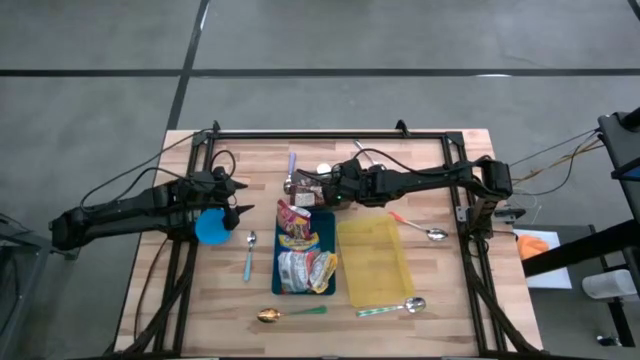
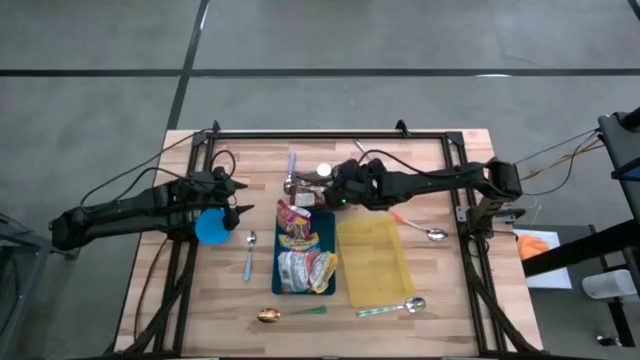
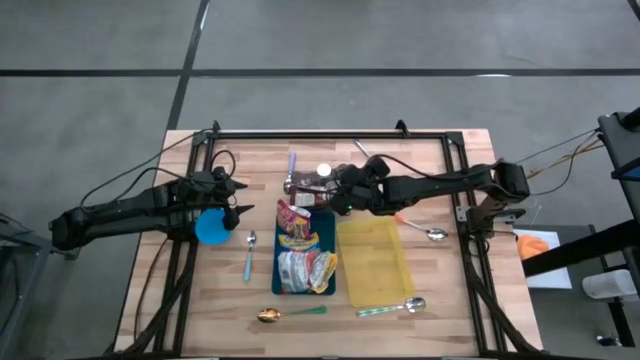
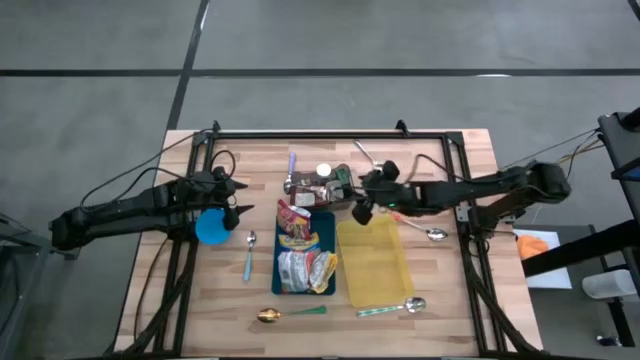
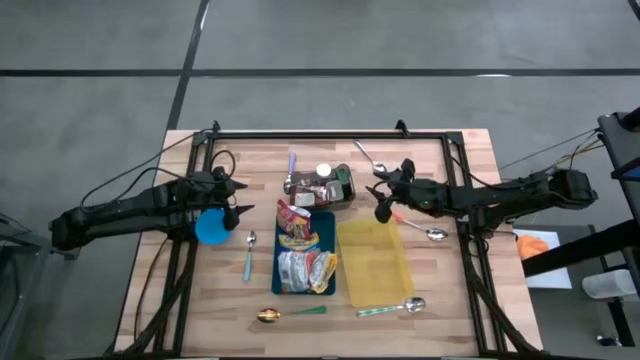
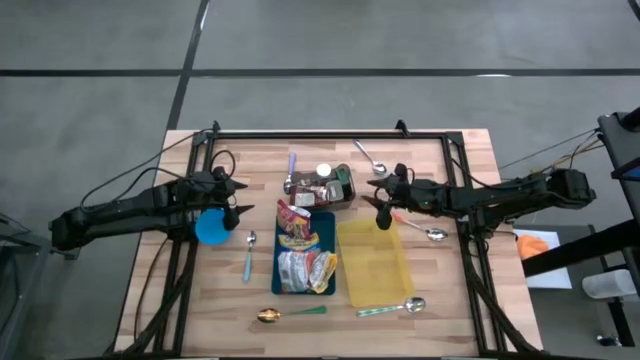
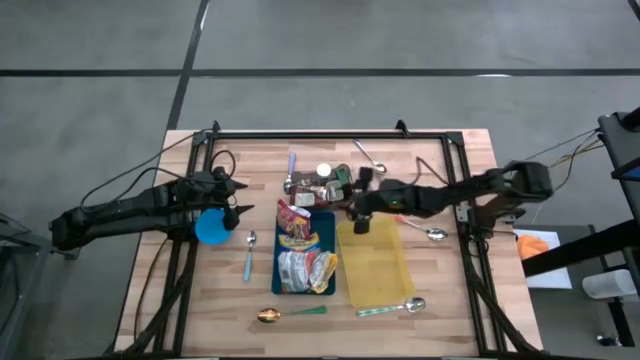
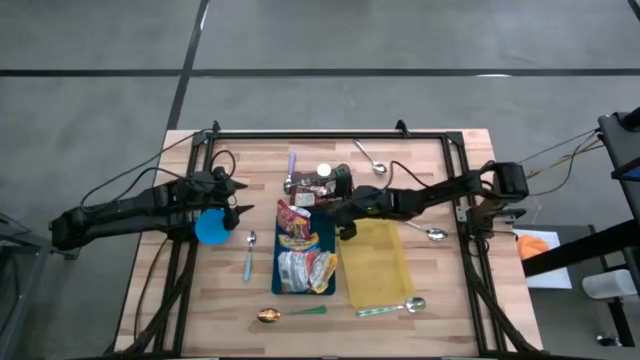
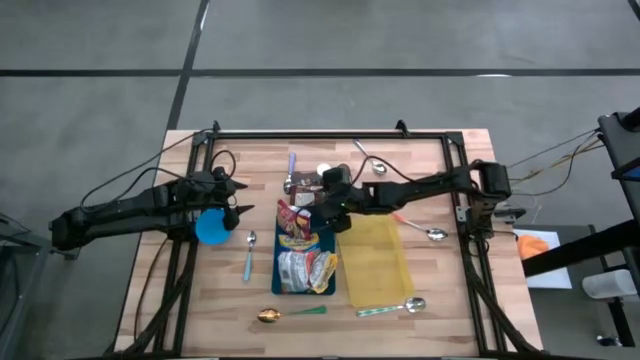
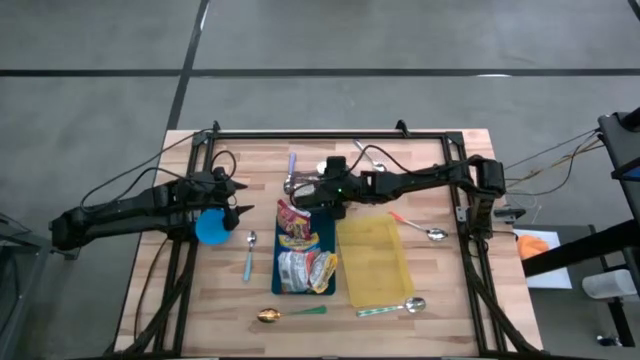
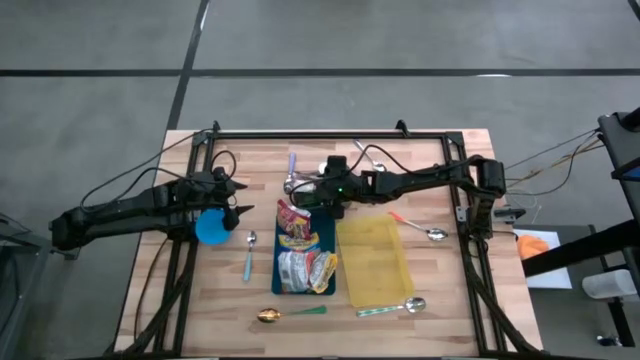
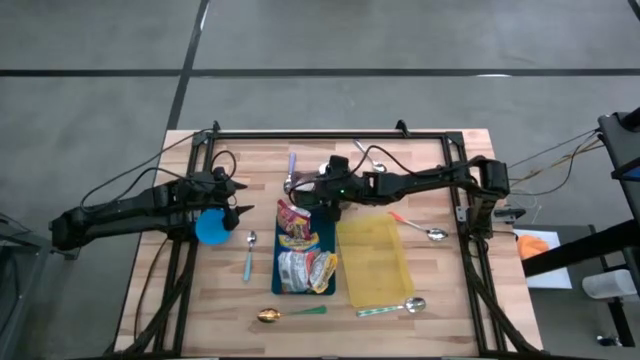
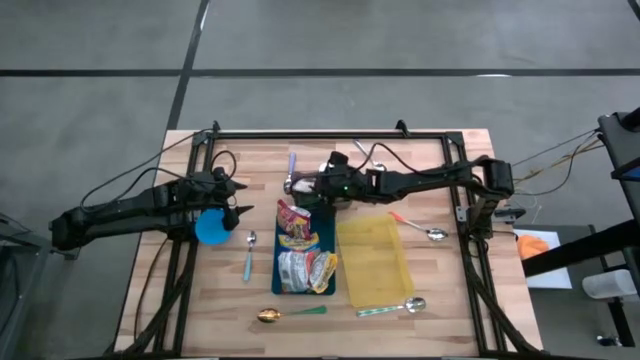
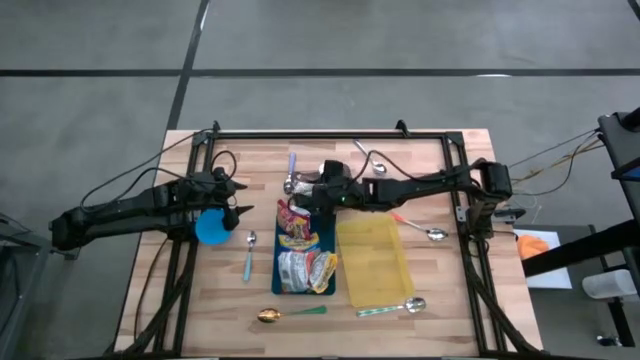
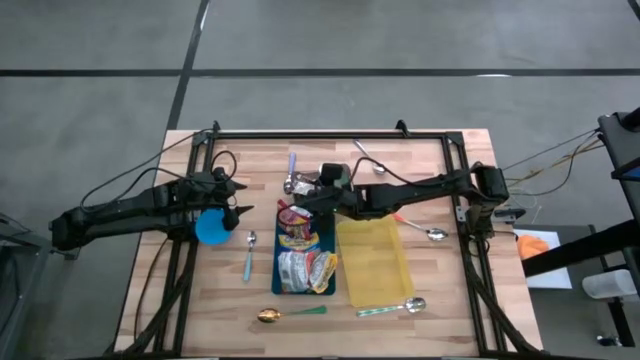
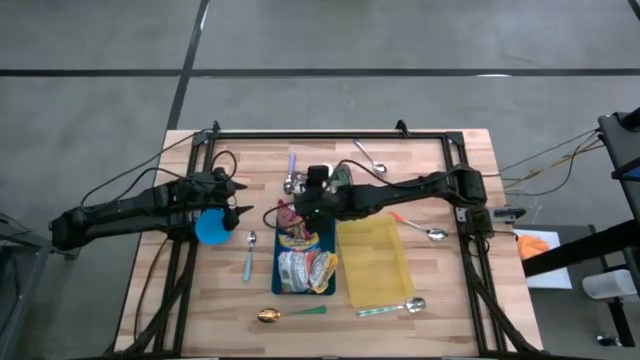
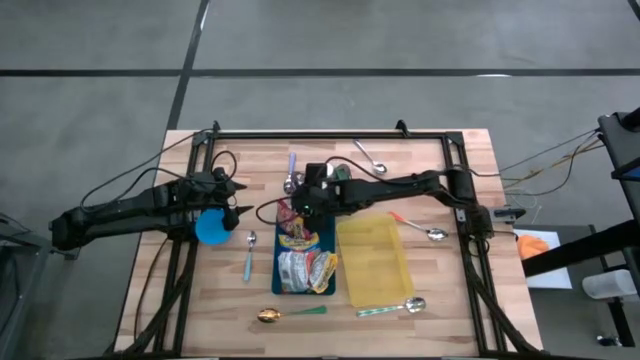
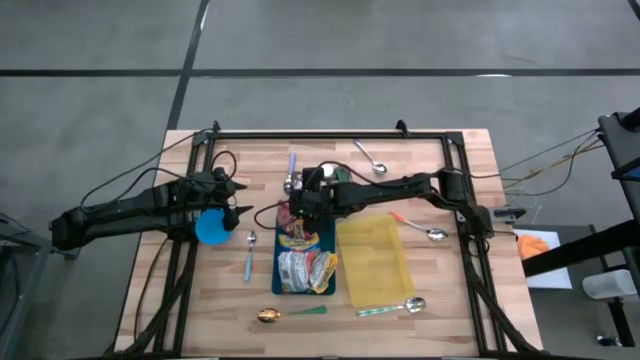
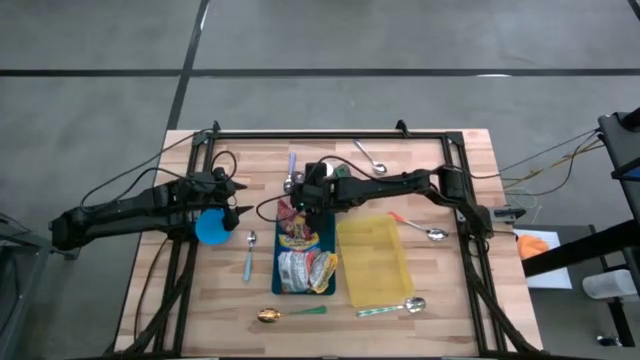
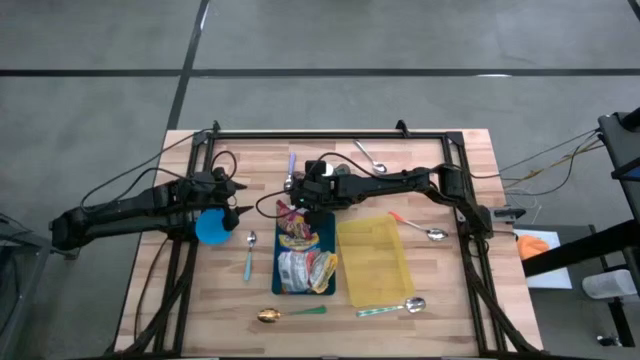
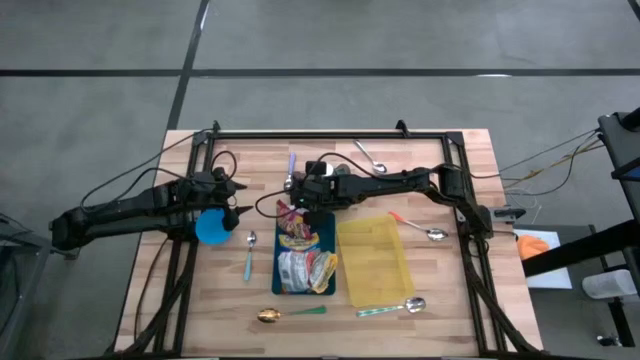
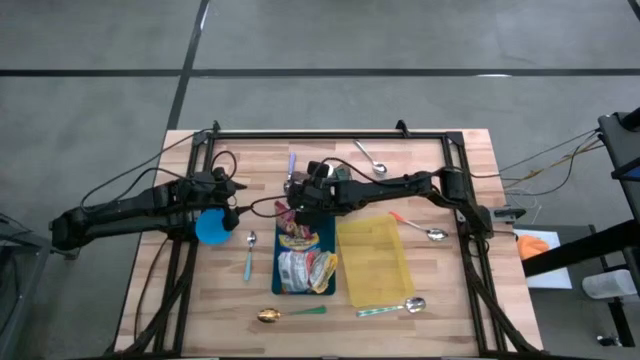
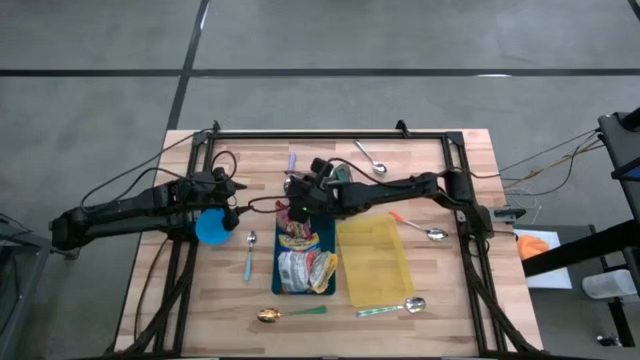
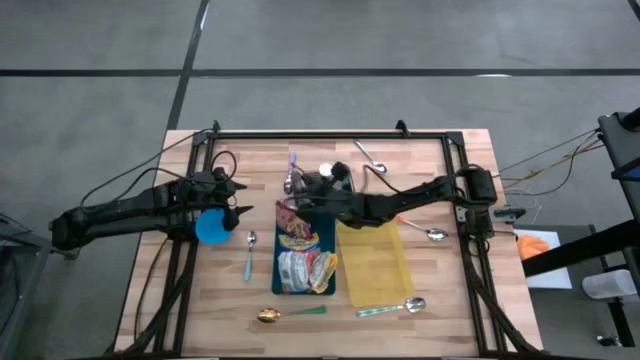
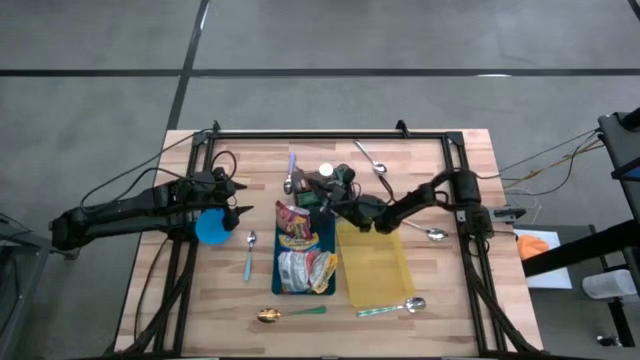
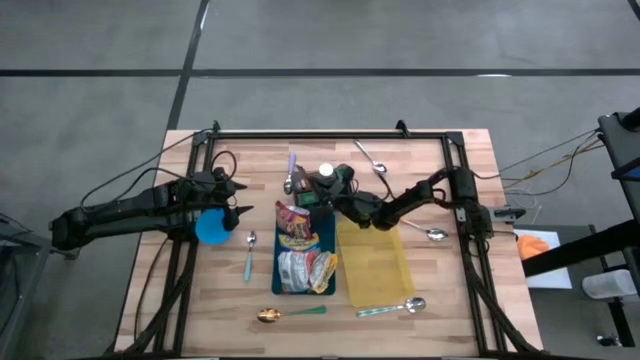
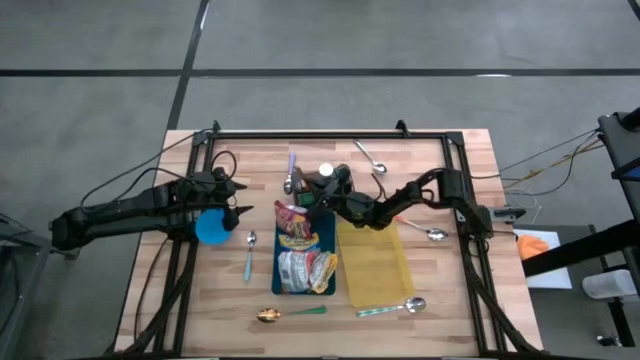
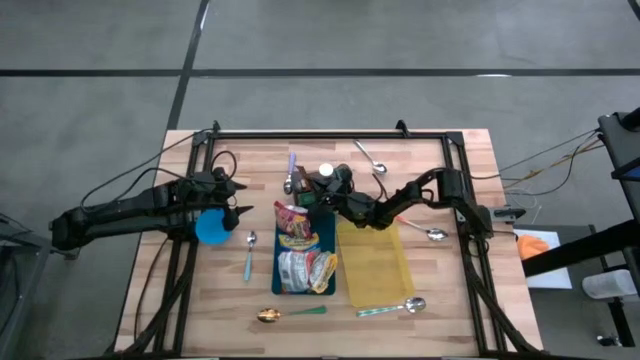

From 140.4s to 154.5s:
Adjust the orange spice bag

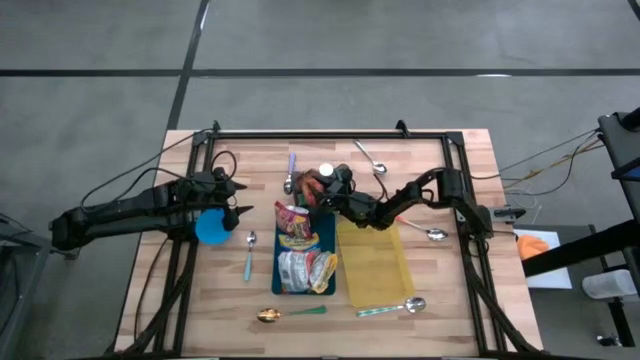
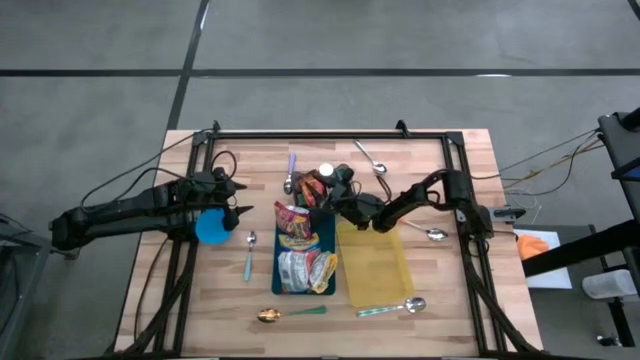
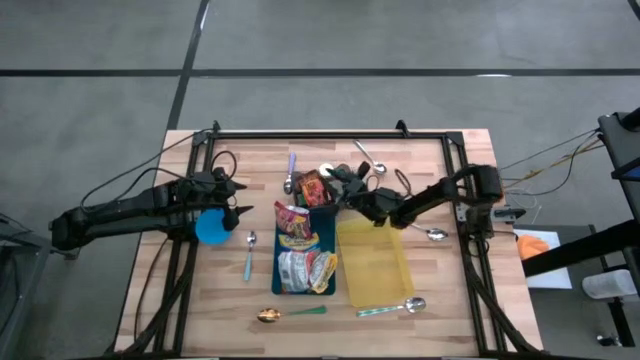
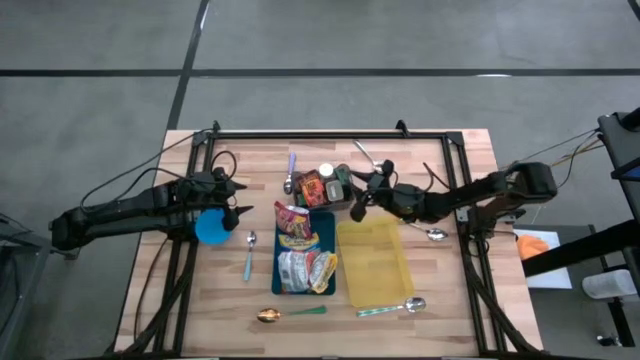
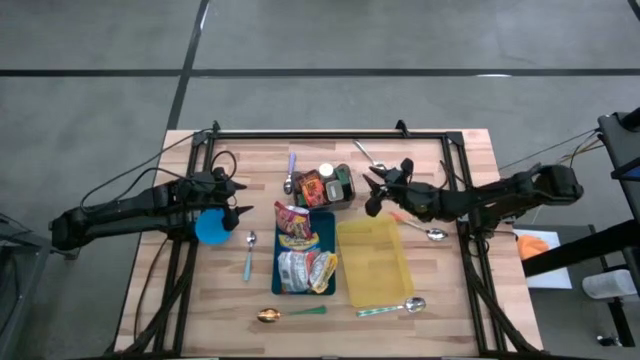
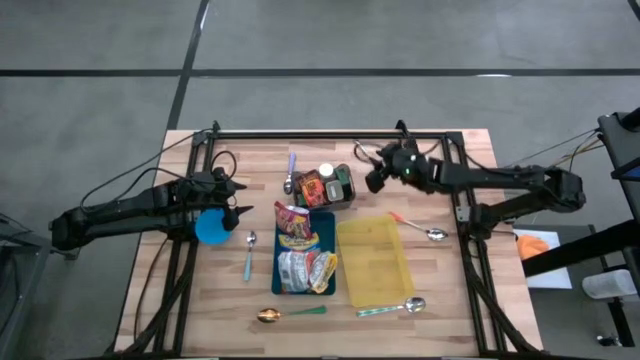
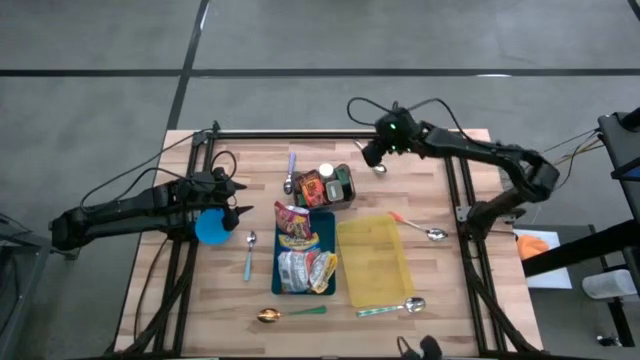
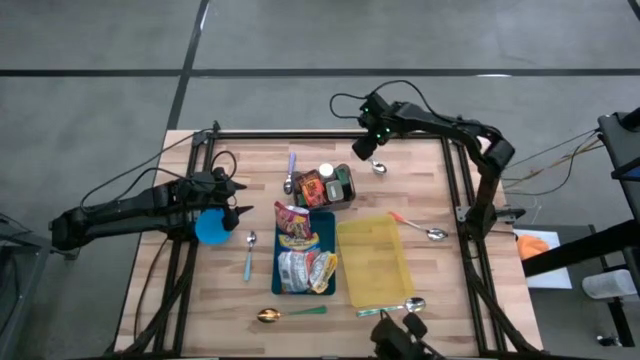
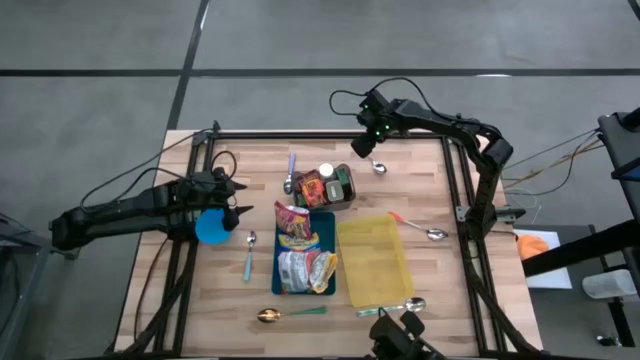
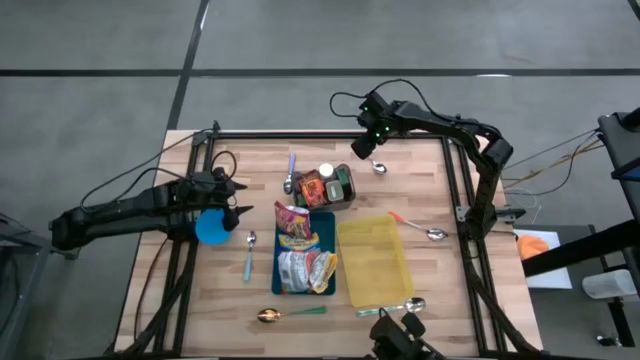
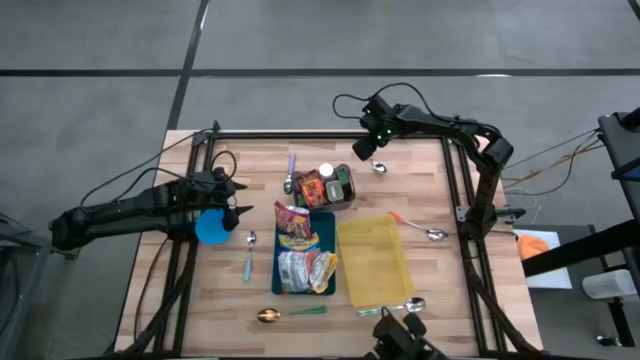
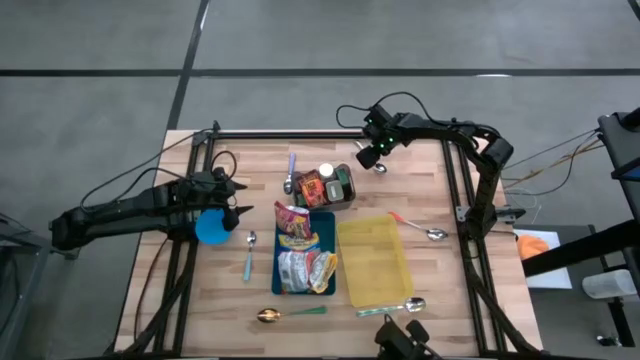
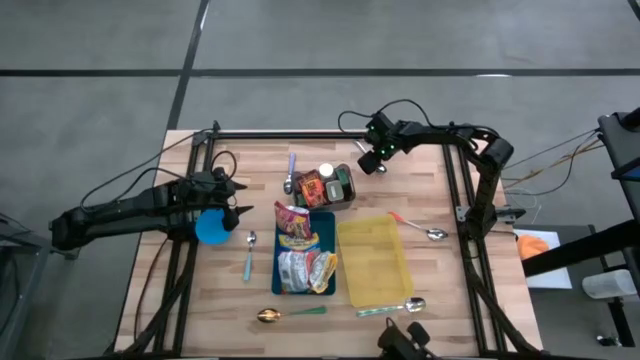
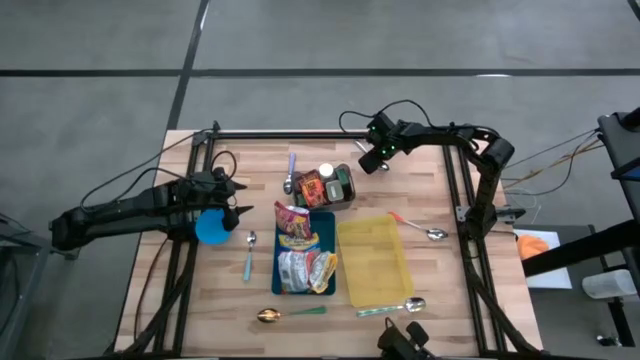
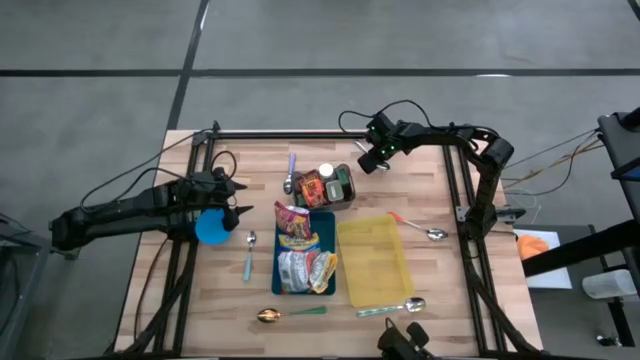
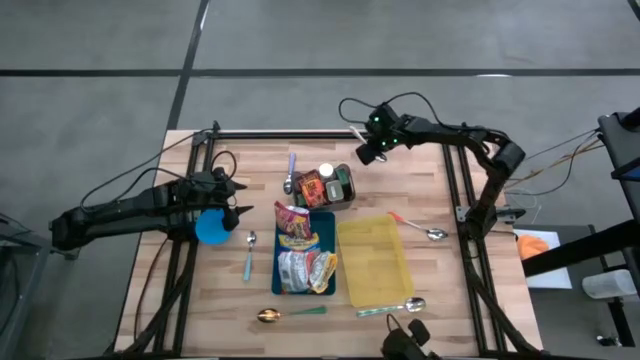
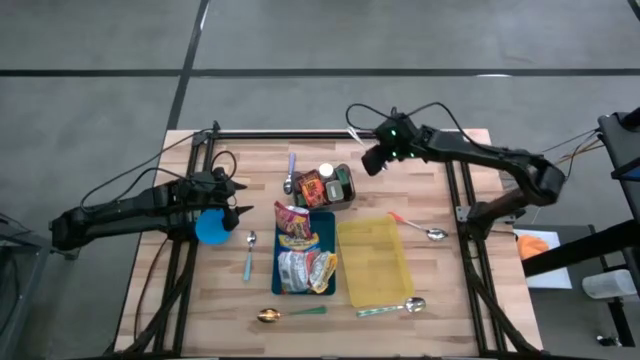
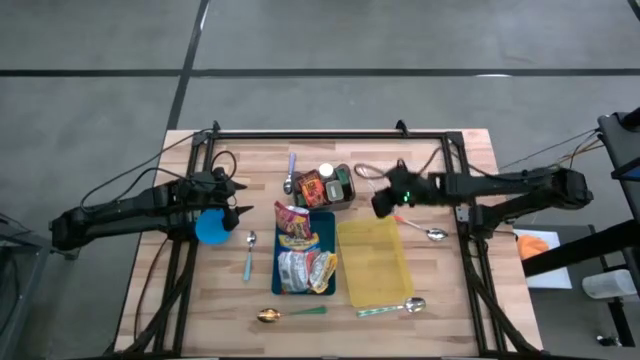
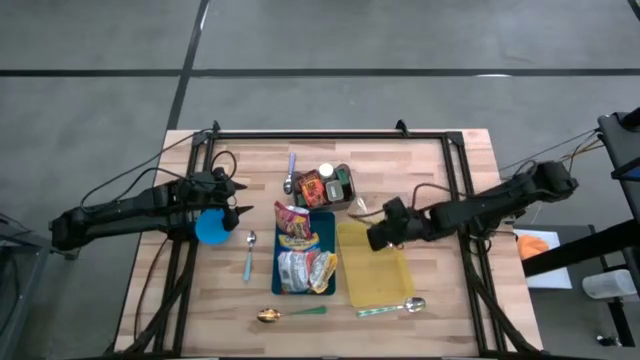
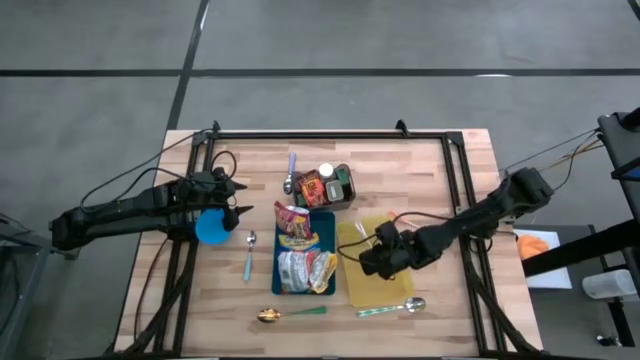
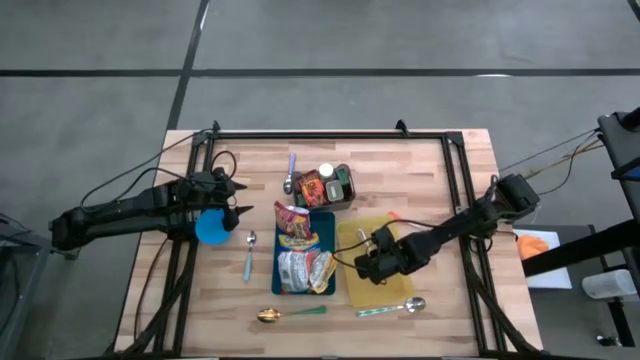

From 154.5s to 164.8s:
Put the silver spoon into the yellow bin
